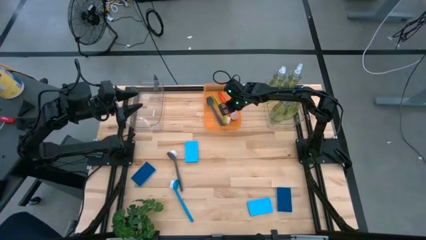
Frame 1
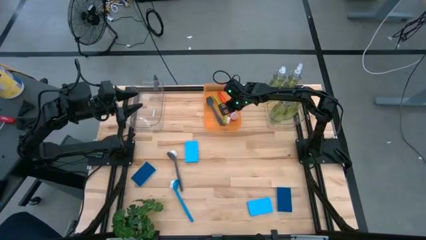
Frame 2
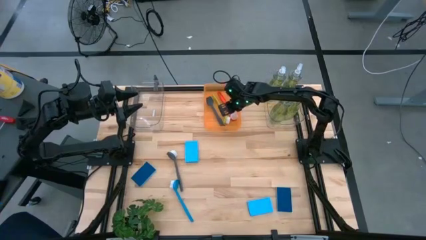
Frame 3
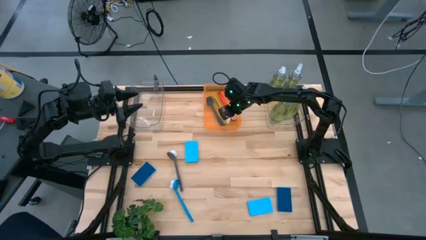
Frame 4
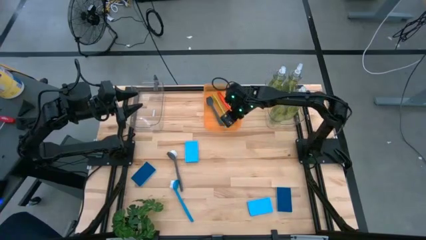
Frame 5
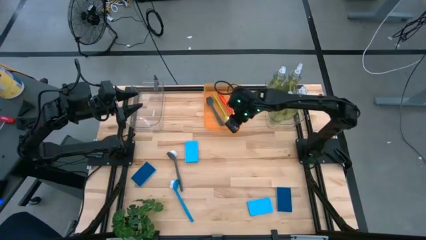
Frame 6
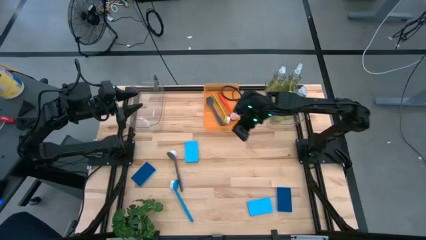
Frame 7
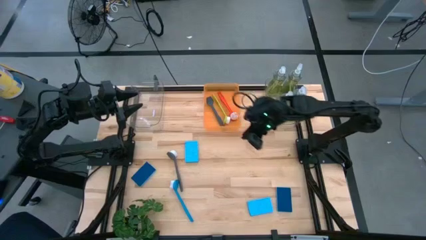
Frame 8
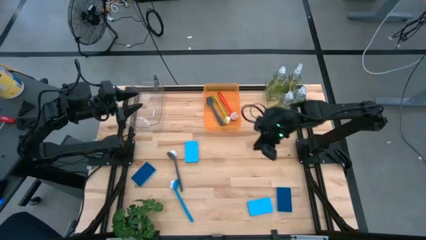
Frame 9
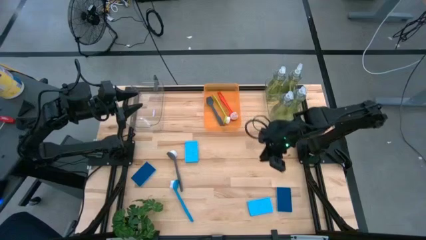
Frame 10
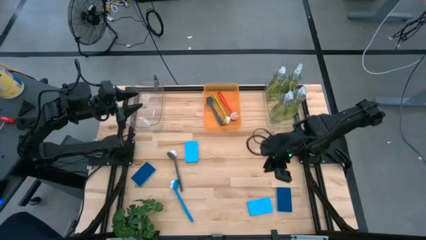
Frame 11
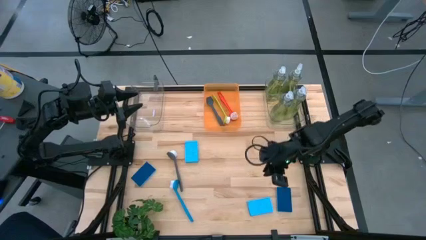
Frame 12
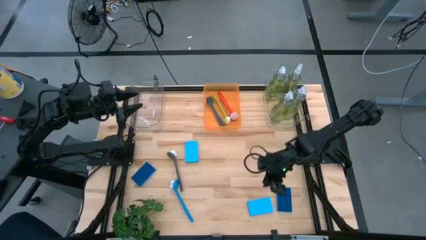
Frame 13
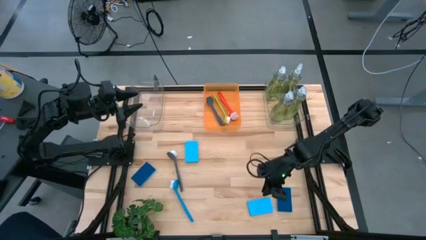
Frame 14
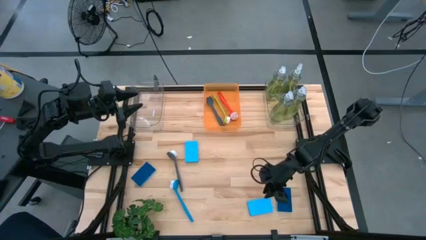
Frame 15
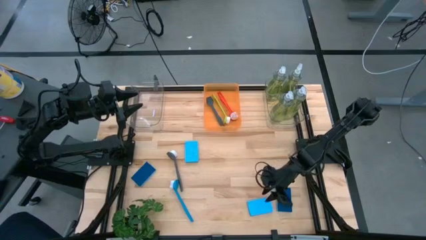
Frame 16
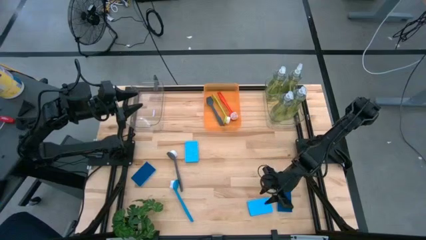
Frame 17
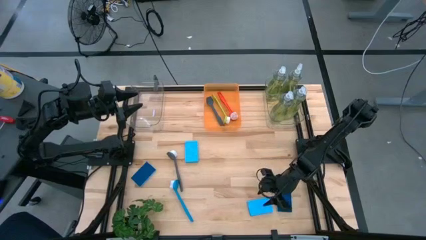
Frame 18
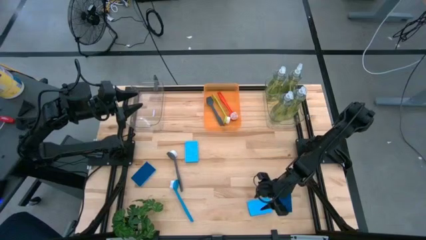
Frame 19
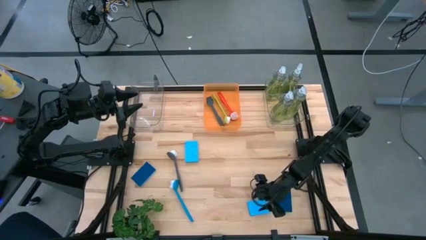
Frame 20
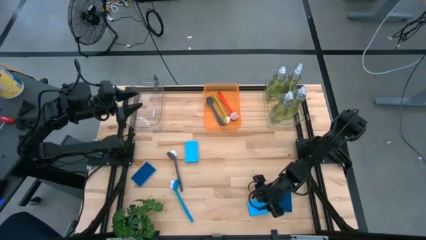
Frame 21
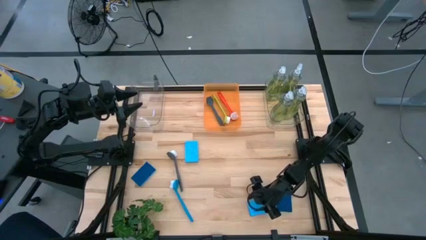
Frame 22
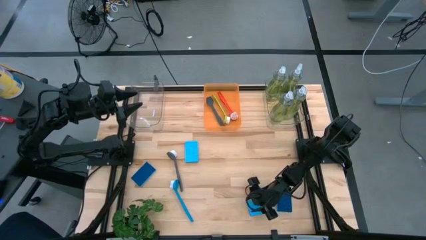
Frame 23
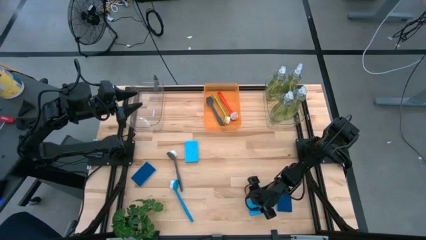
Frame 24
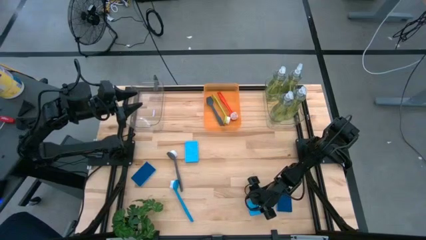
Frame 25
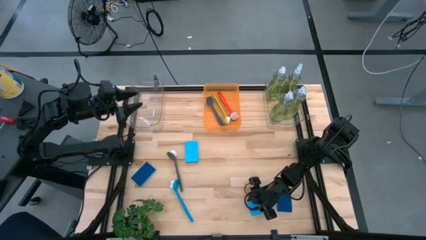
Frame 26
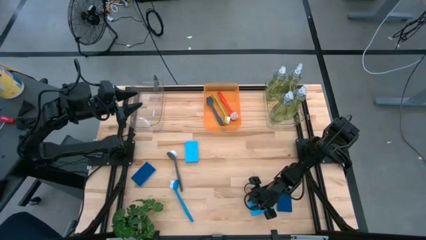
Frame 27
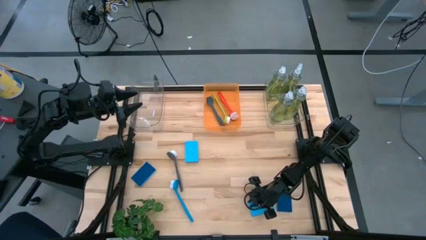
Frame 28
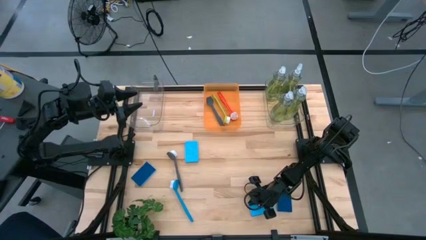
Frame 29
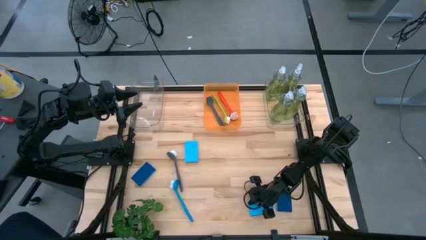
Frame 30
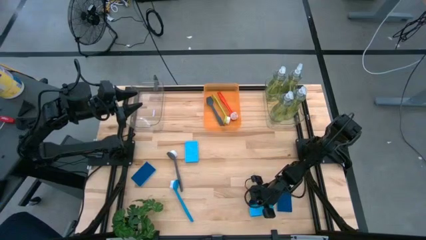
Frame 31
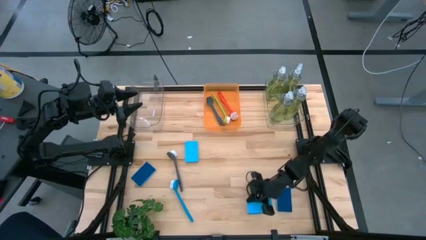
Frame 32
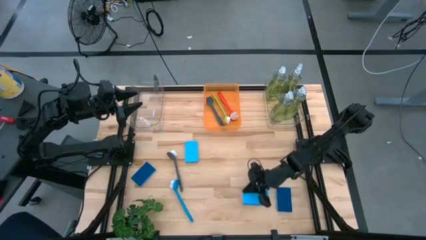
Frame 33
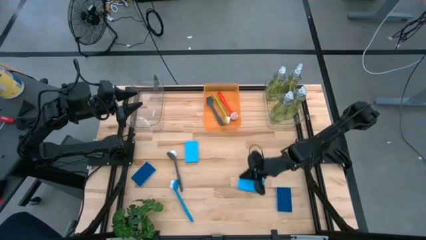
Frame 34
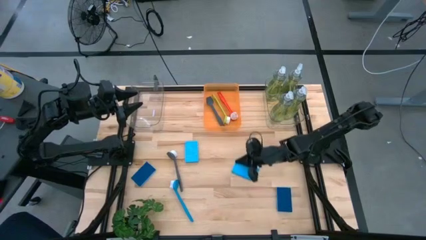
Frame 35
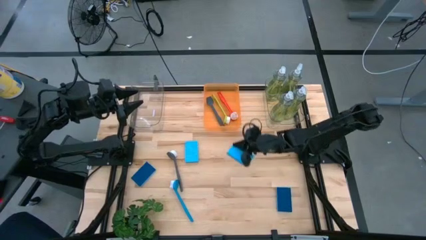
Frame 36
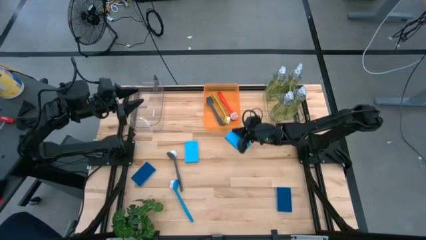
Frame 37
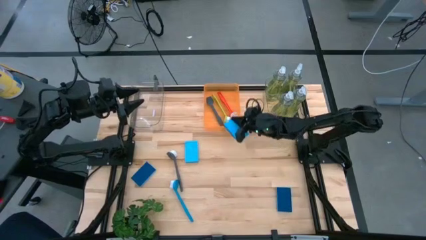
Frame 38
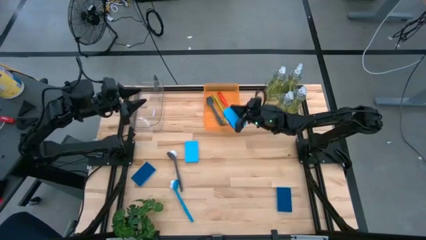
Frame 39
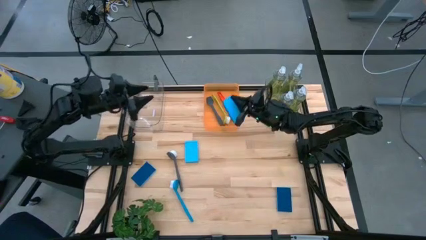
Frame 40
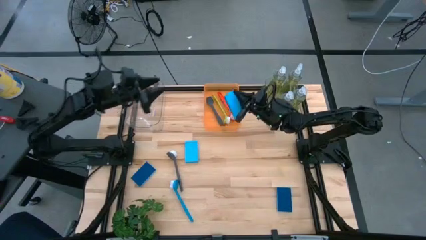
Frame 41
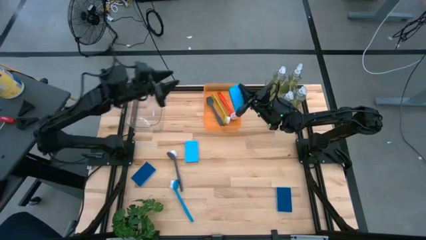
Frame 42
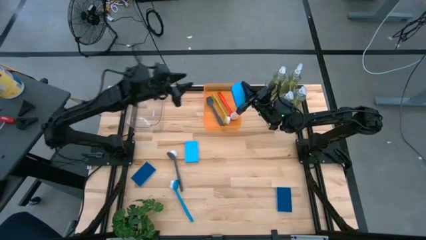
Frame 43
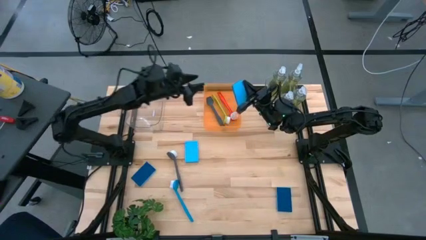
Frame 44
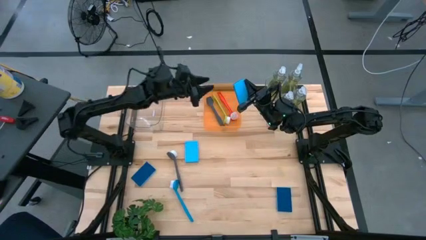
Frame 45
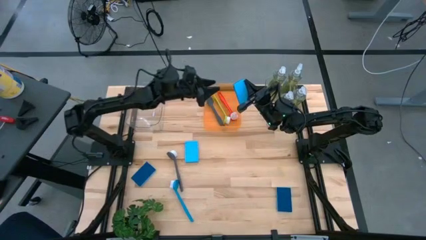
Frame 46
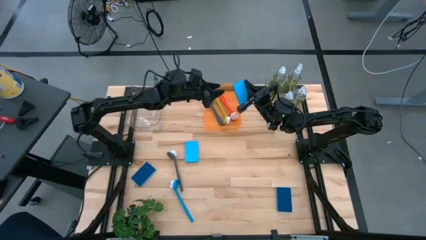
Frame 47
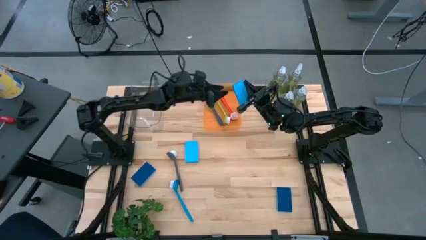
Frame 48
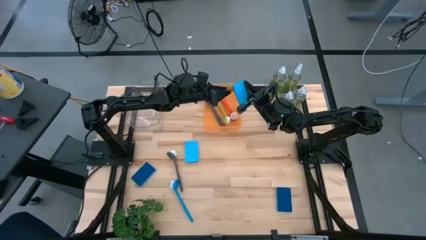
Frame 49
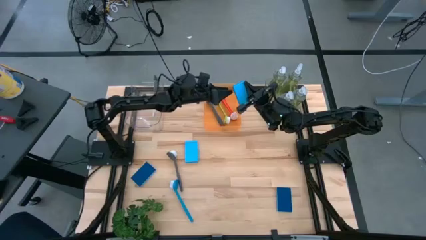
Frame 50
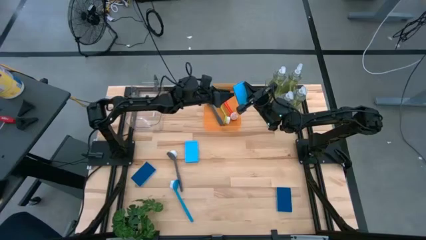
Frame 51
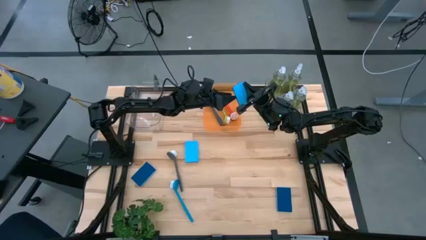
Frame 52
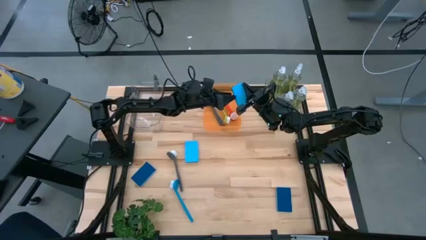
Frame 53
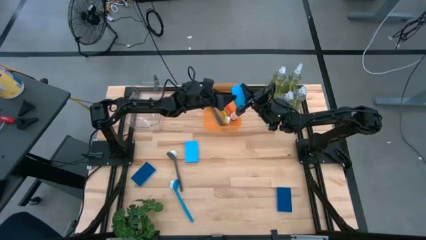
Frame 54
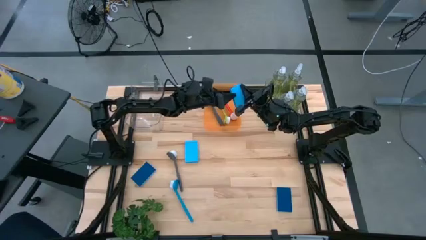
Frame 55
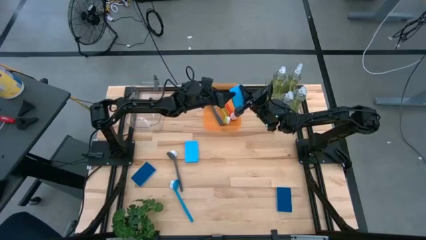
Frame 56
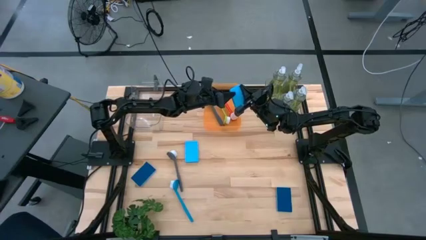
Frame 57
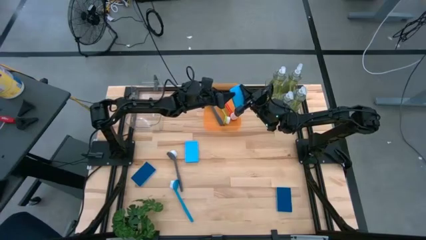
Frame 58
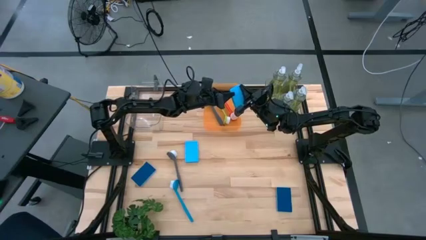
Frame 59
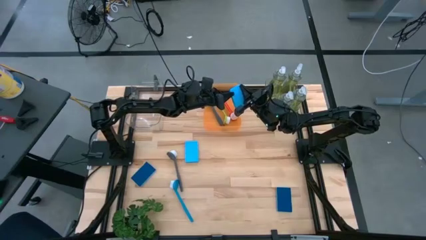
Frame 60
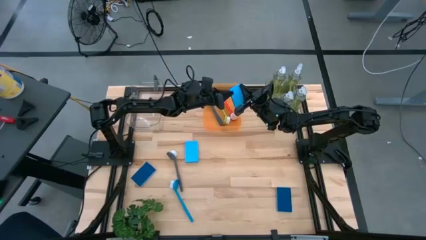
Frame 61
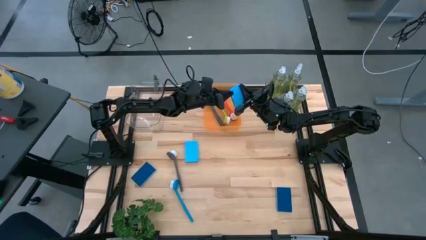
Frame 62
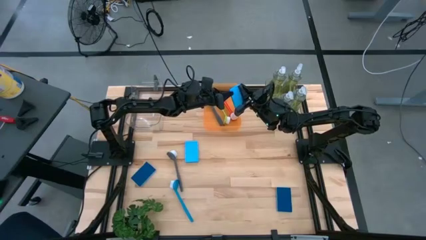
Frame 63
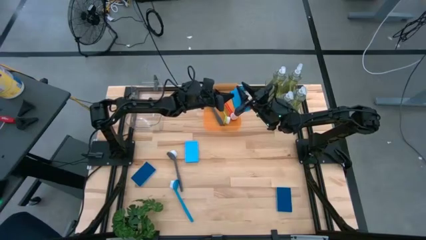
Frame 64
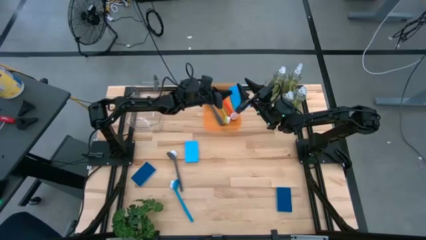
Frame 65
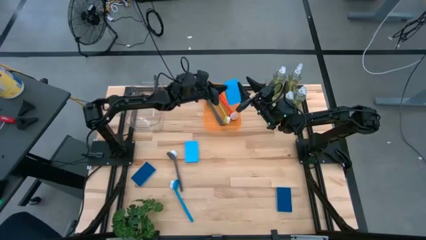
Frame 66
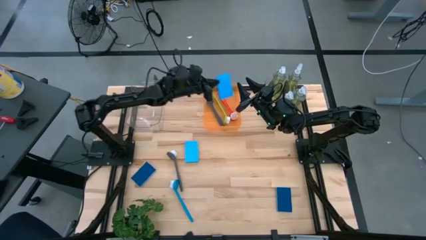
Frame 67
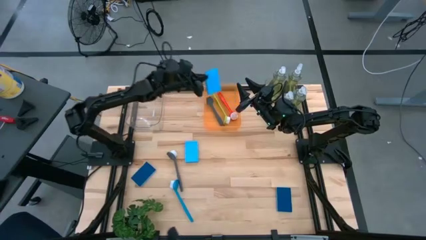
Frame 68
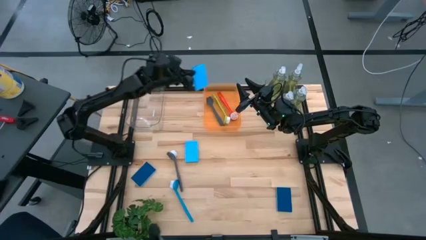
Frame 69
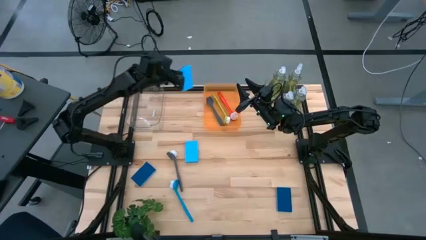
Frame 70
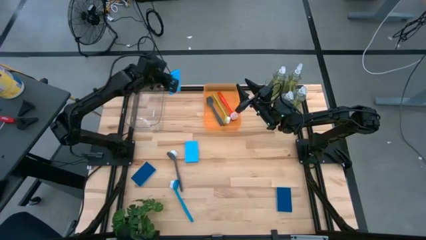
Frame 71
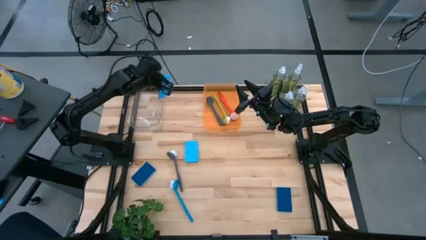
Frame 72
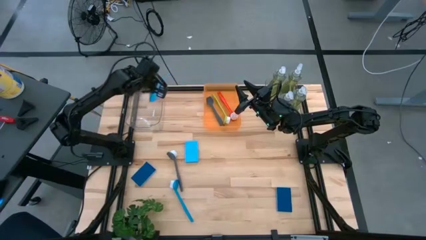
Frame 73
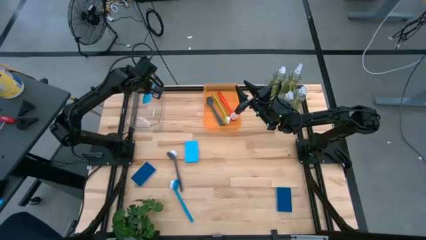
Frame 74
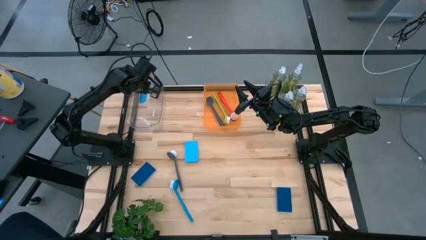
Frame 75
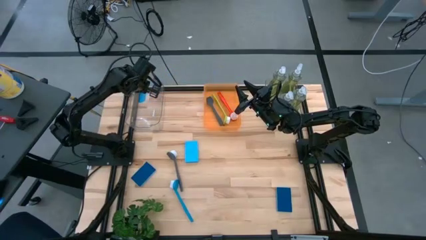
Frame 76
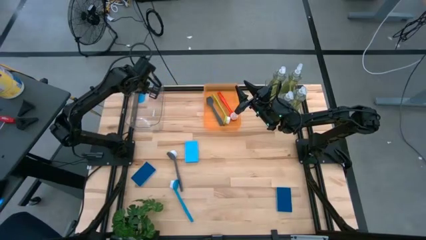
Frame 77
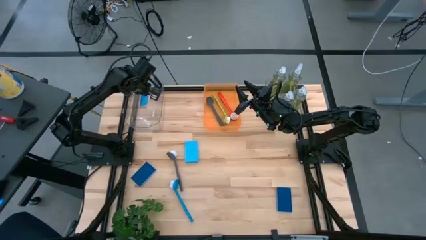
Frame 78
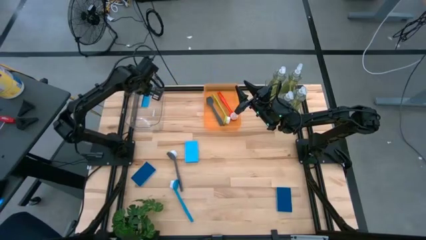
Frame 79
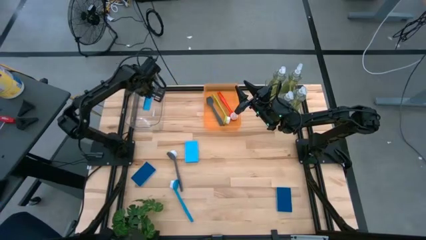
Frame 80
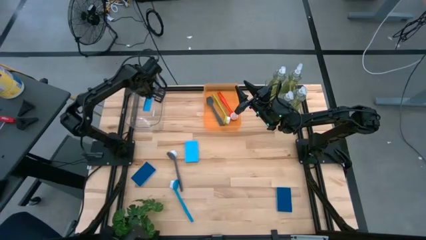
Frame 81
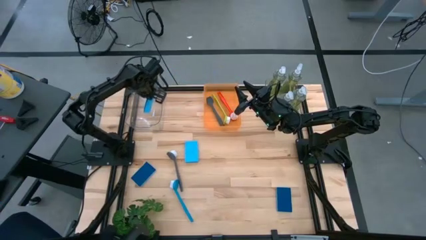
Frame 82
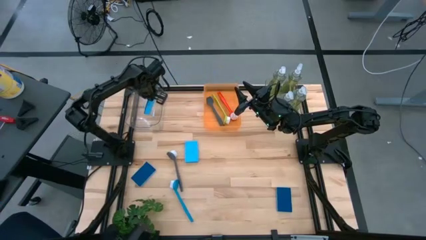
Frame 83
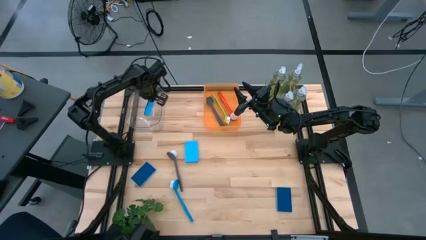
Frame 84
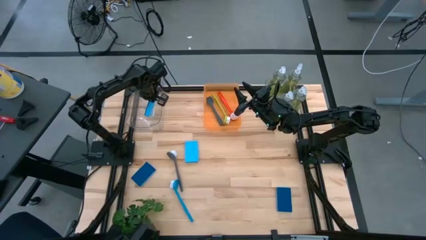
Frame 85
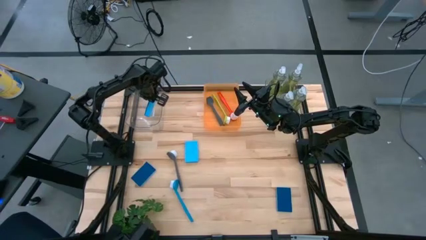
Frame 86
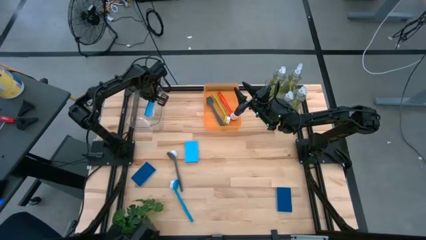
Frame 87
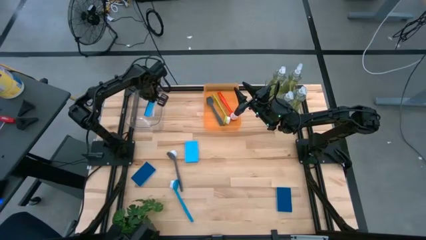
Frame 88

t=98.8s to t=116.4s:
Task: Pick & Place Kitchen Sink Supplies
Put the blue sponge into the left transparent bin
